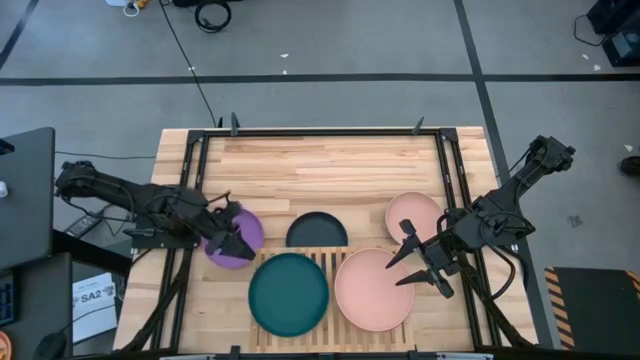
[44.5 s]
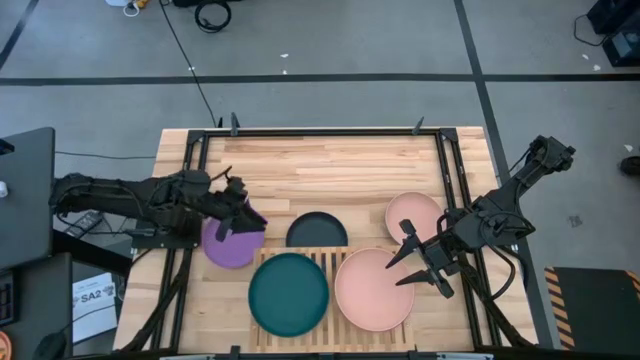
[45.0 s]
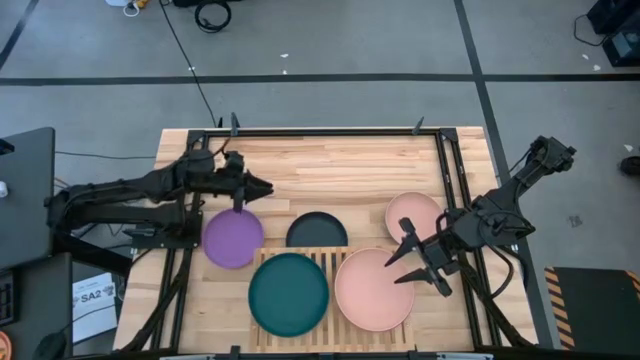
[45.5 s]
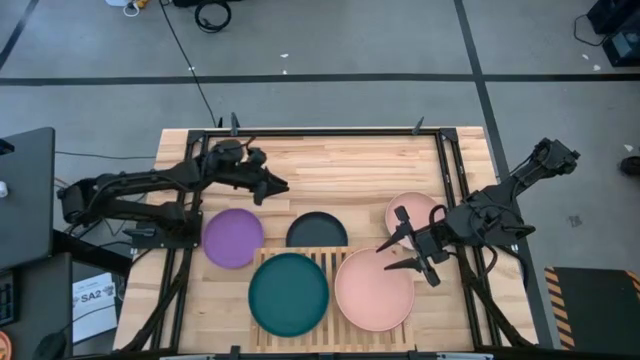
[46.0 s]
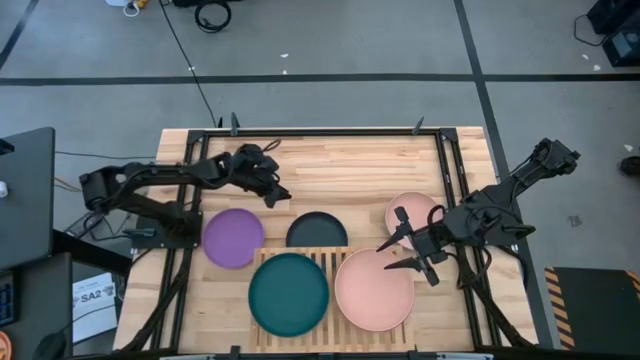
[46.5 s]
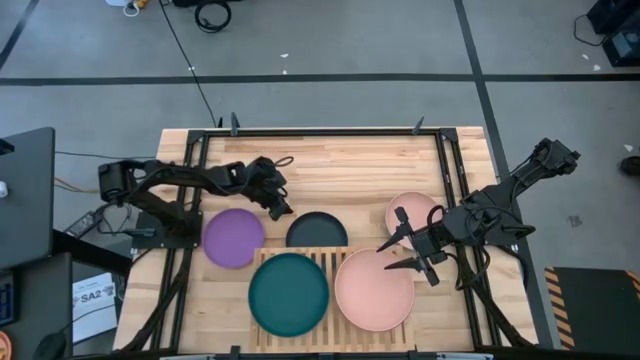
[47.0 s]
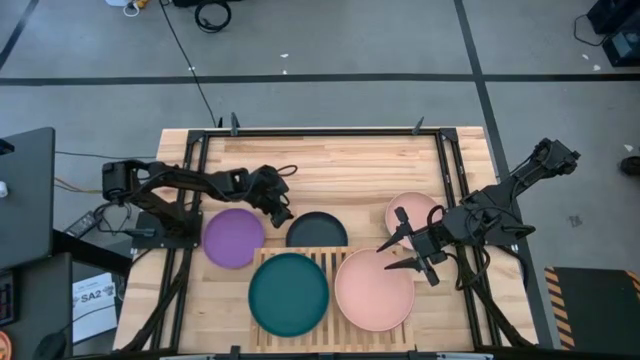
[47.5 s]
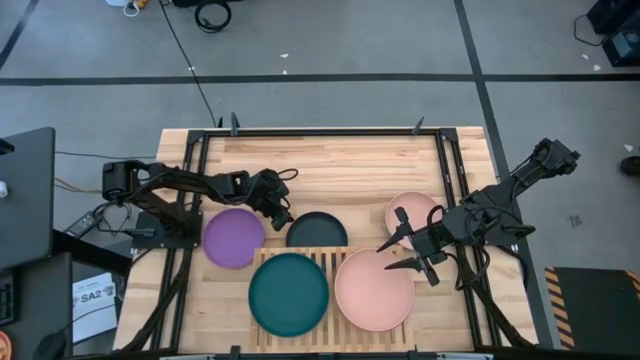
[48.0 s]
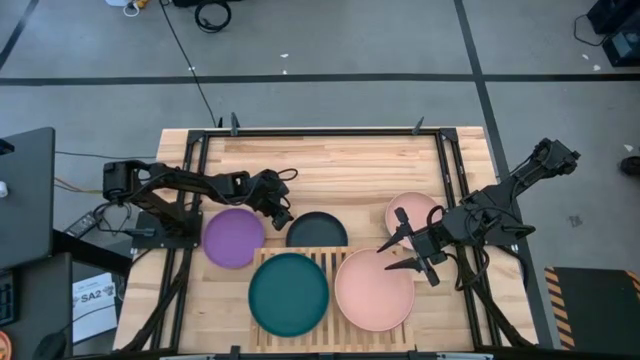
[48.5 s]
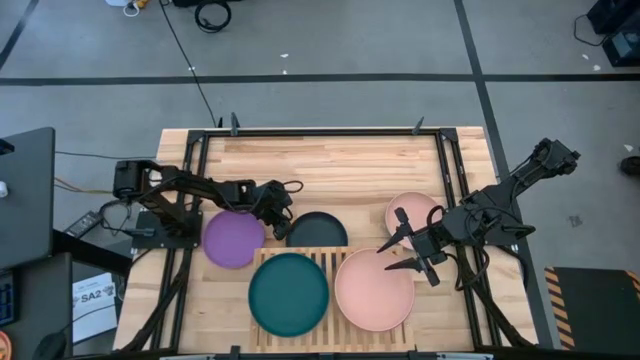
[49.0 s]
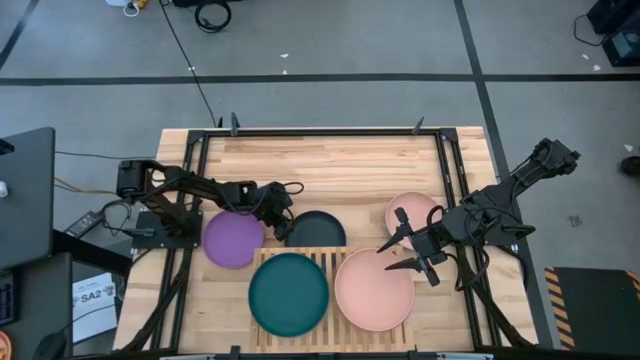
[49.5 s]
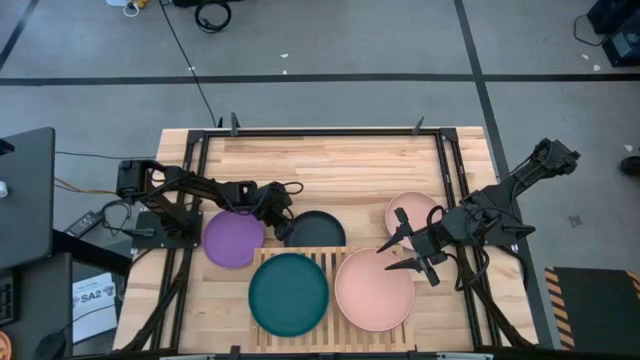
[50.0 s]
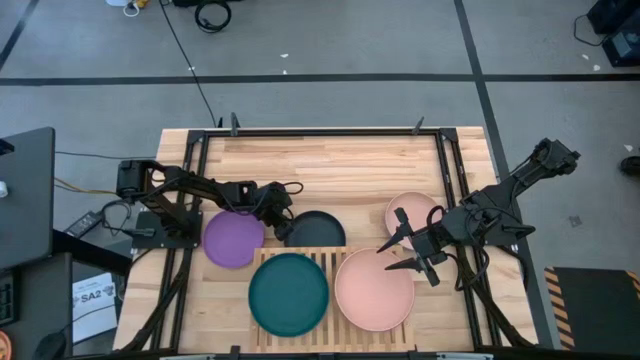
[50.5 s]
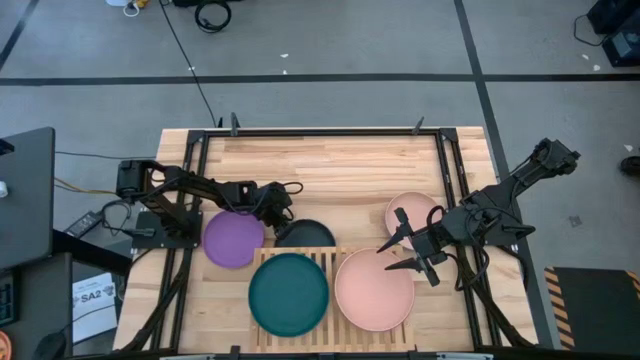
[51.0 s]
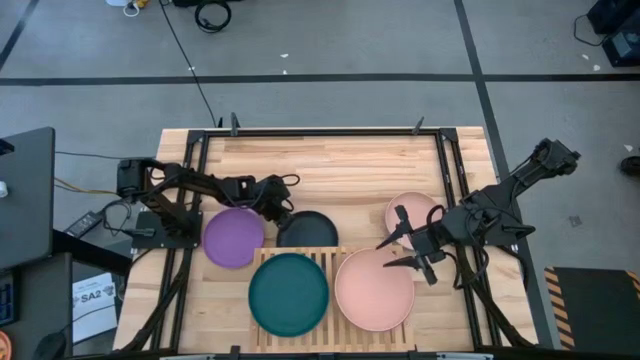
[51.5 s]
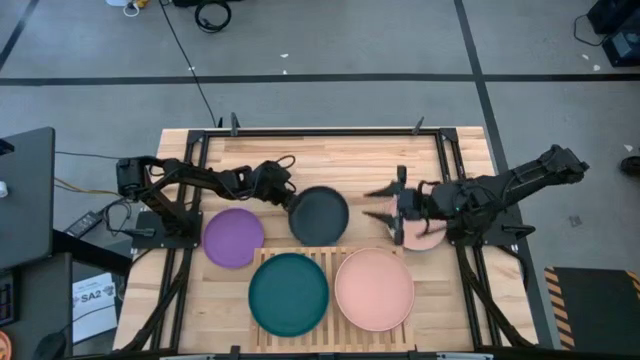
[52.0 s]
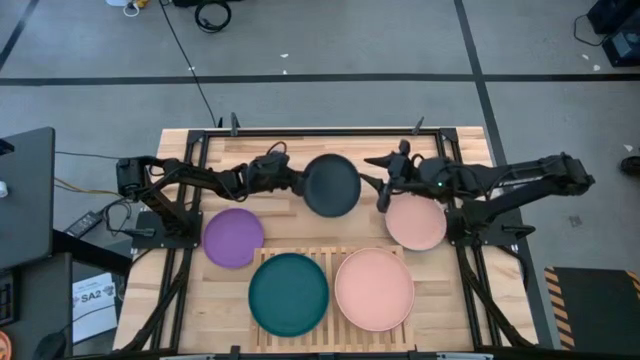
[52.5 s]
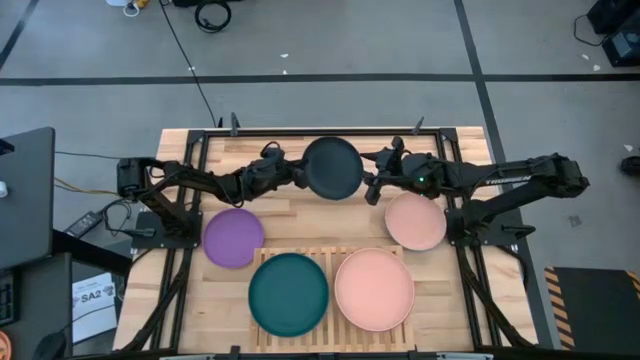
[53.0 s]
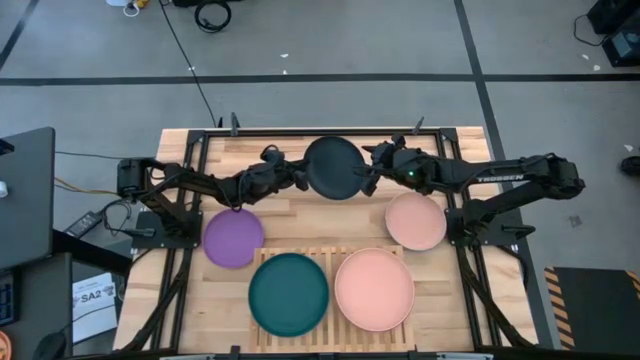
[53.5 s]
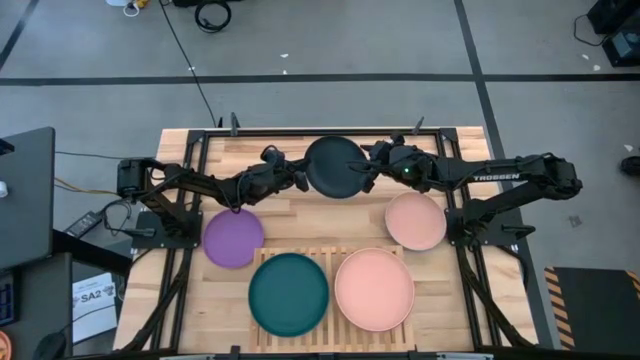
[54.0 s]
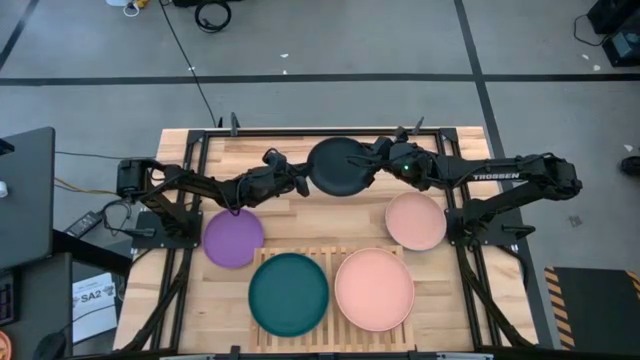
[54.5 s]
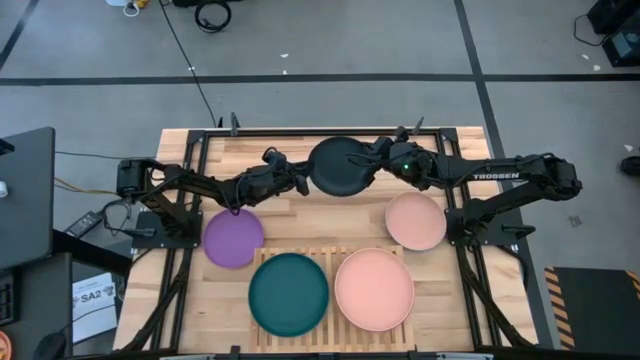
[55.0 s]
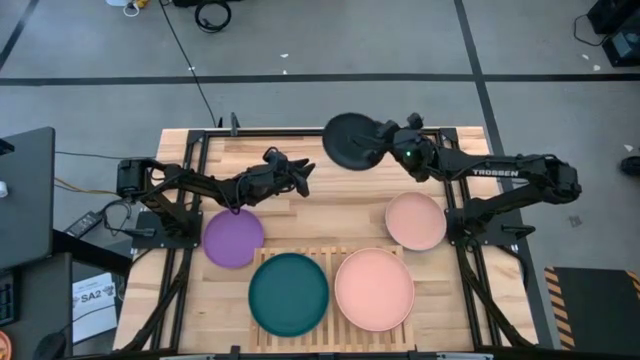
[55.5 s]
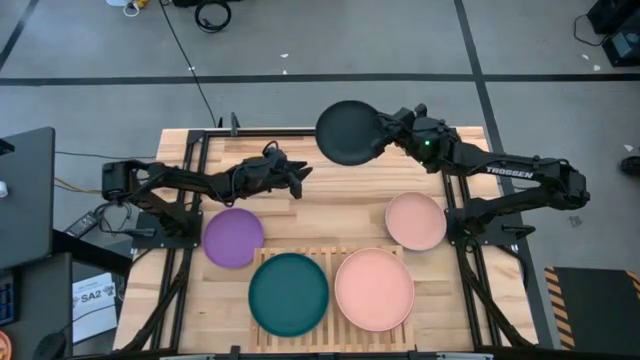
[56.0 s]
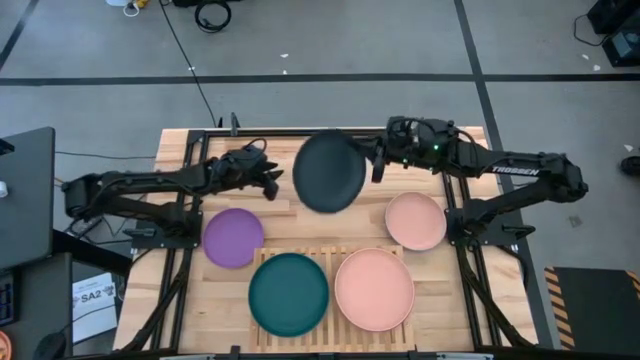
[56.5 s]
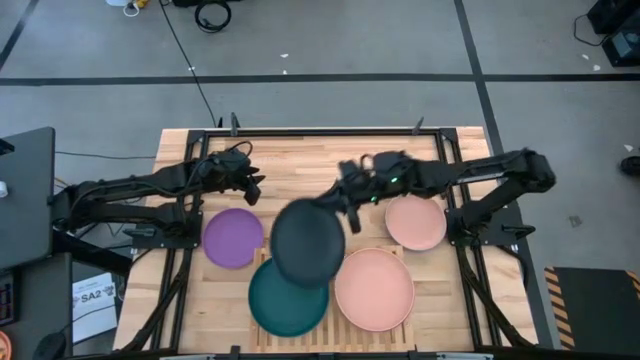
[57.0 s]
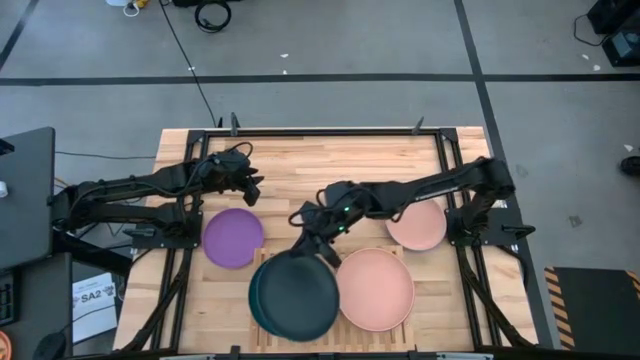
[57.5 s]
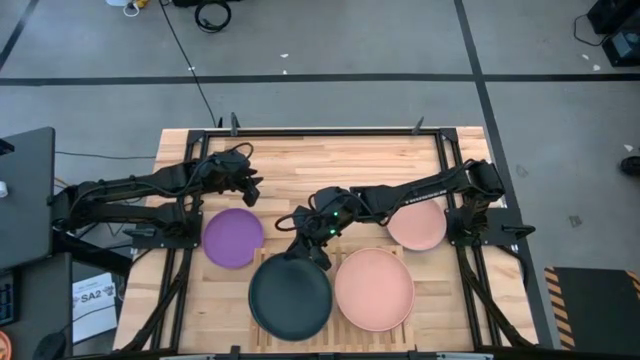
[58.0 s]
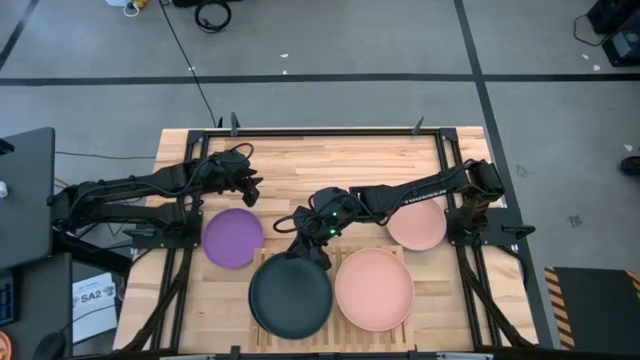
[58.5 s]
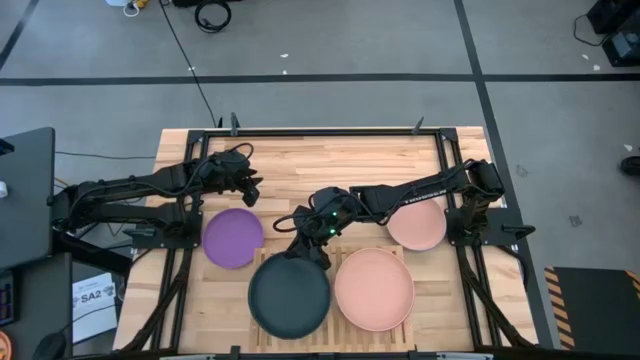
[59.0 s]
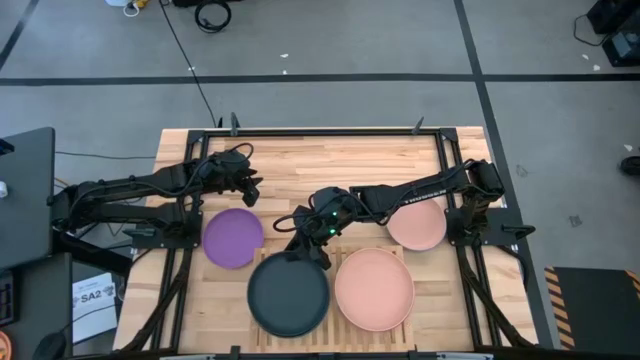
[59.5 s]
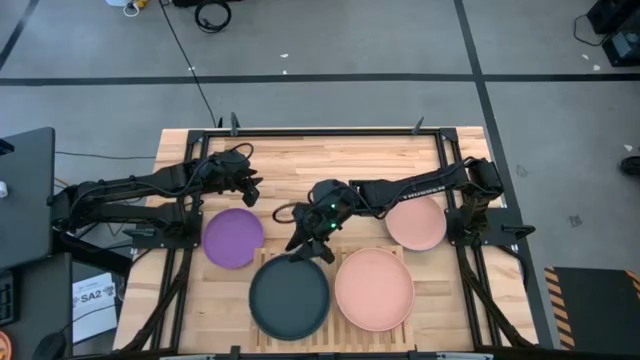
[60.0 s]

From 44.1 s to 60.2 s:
Task: Place and stack plates onto a shelf
Stack the black plate on top of the dark green plate on the shelf

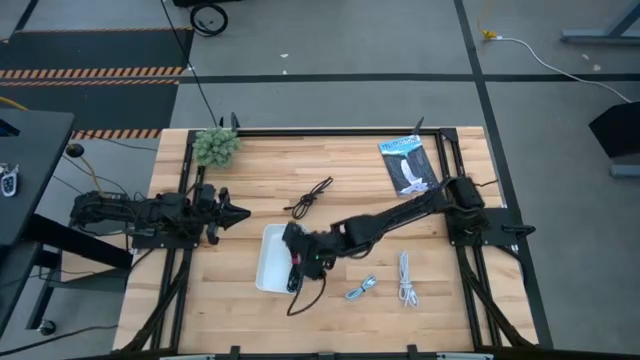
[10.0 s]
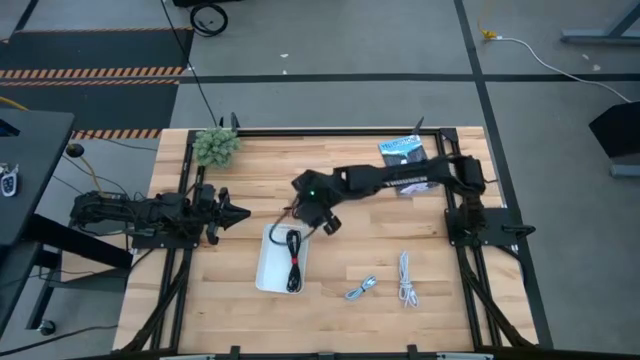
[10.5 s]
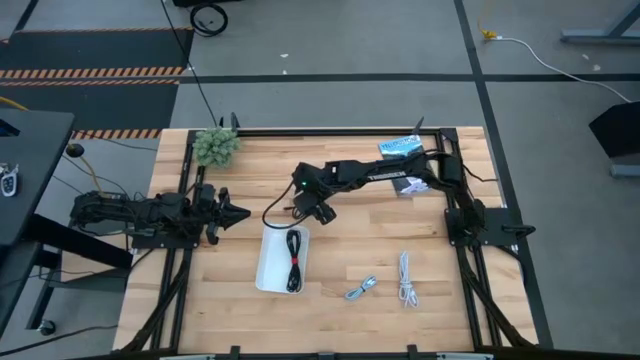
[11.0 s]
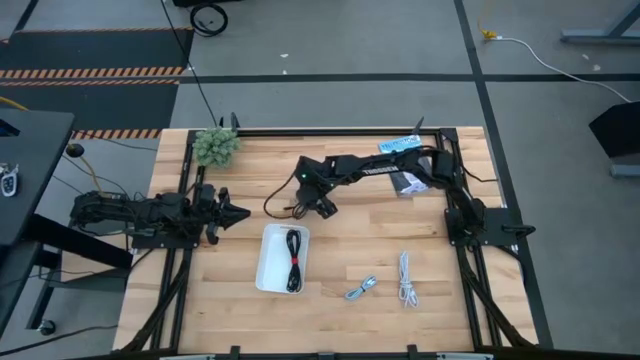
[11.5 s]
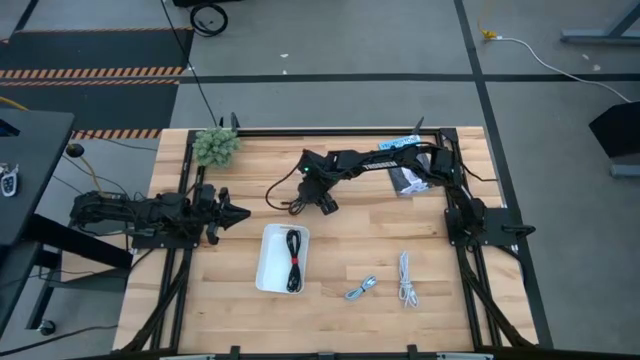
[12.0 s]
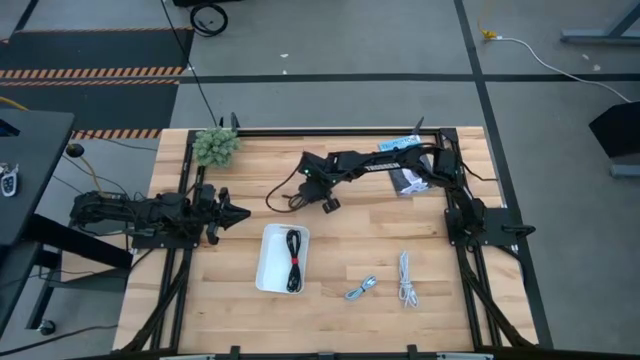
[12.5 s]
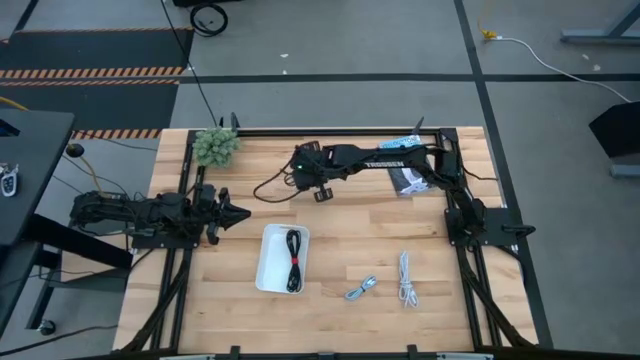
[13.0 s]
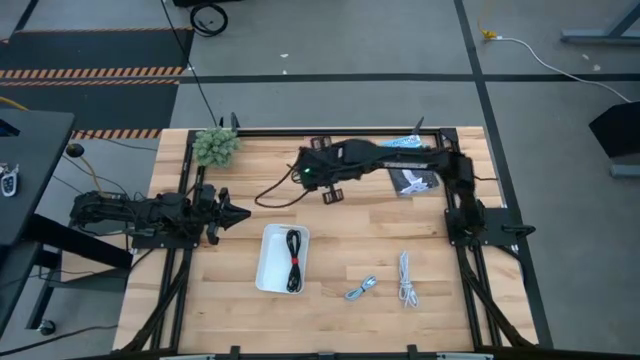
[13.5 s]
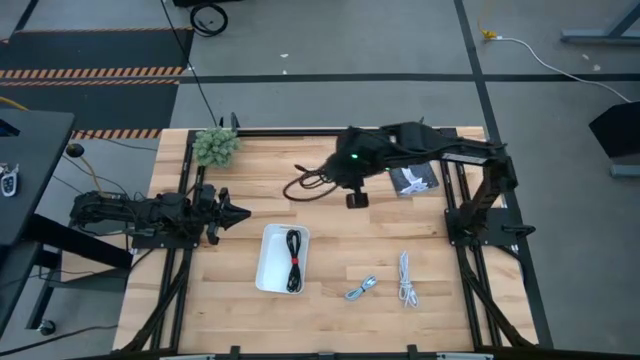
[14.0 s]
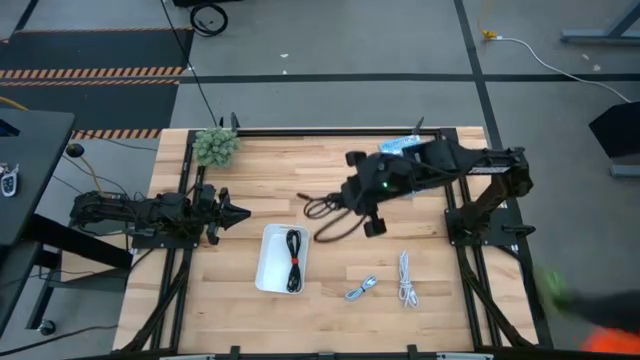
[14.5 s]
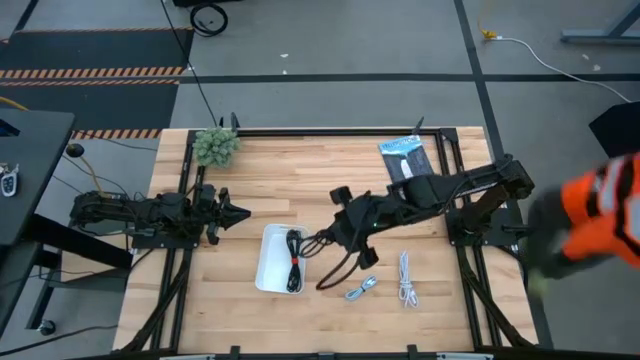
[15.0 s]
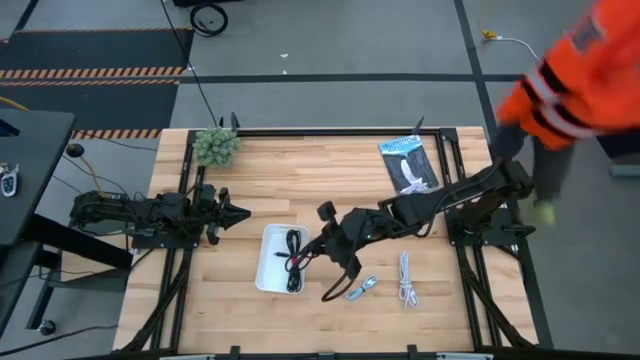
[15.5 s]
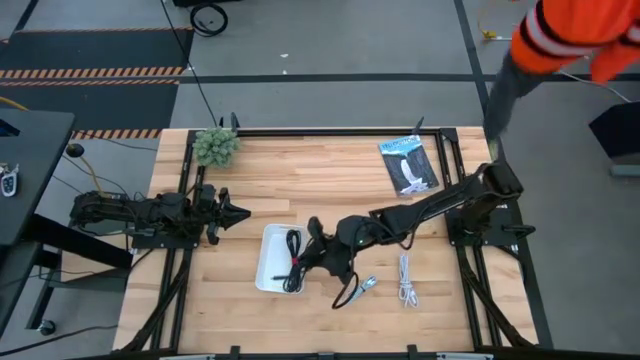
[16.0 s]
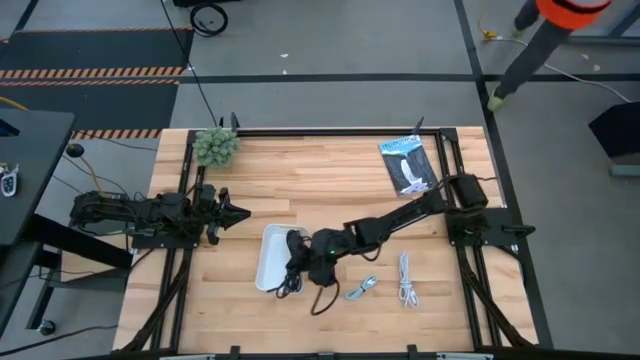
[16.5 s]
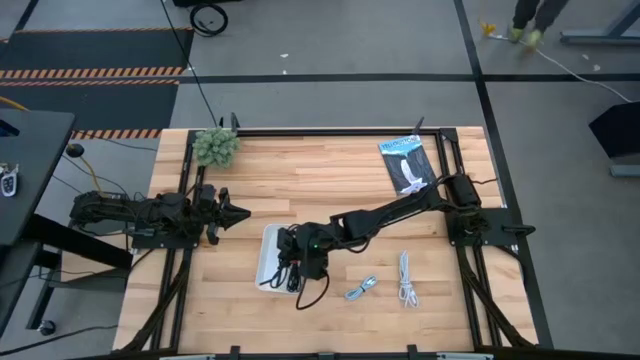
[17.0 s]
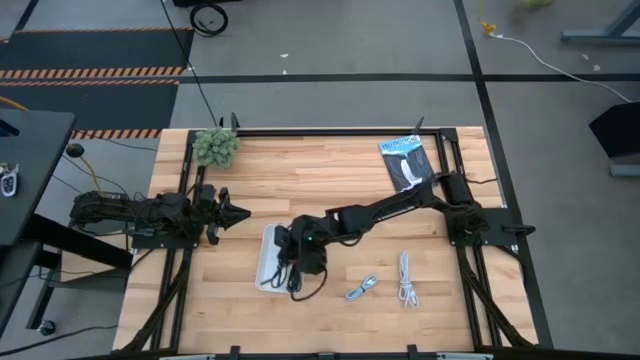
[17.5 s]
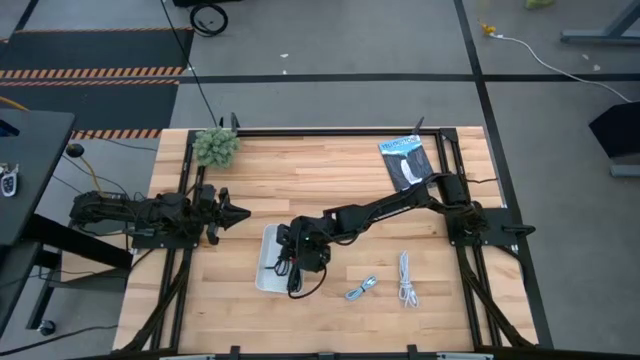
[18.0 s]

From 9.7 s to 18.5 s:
Task: Pick and place USB-C Cables
Put the black charger cable into the white bin
